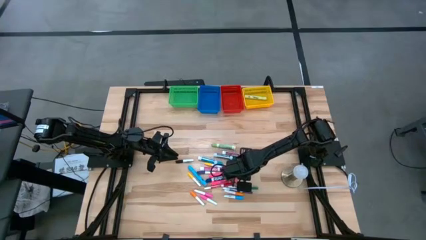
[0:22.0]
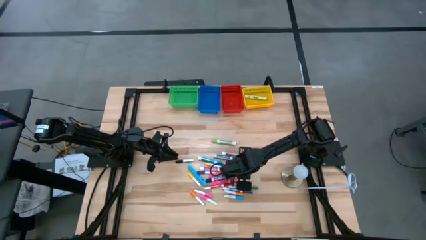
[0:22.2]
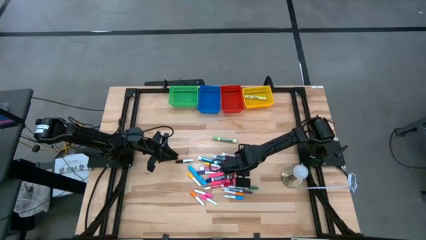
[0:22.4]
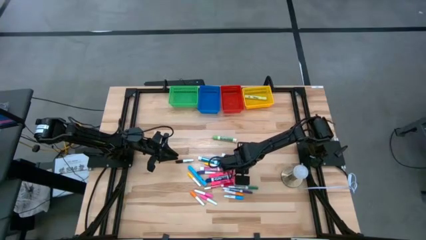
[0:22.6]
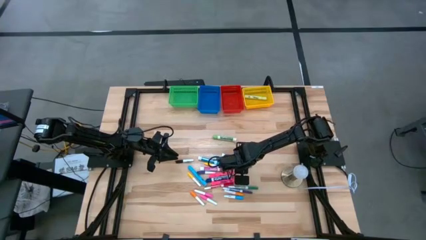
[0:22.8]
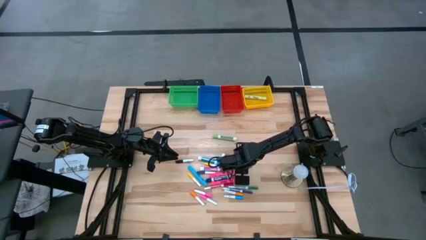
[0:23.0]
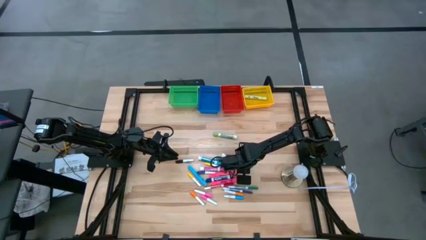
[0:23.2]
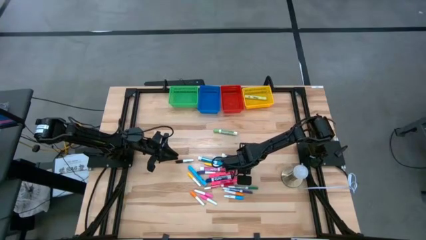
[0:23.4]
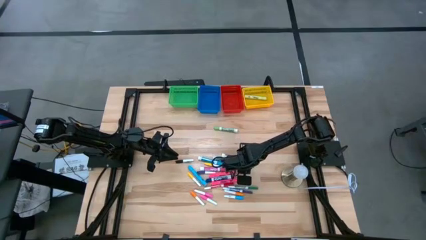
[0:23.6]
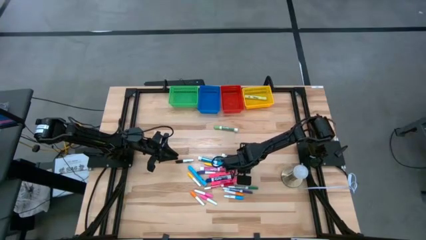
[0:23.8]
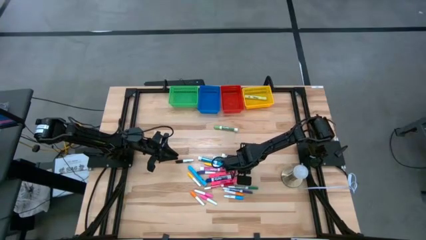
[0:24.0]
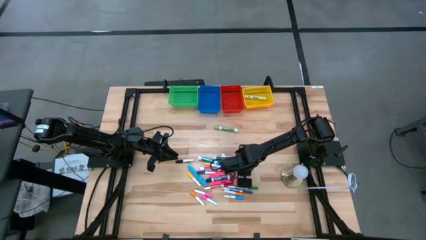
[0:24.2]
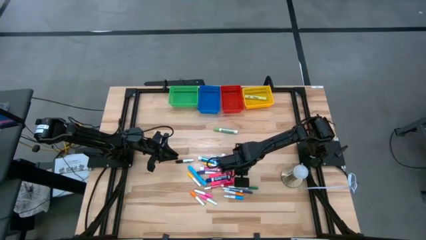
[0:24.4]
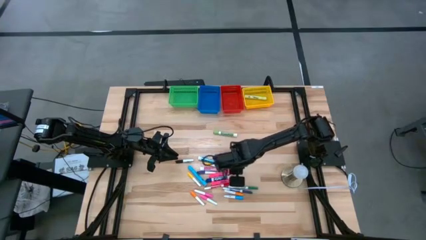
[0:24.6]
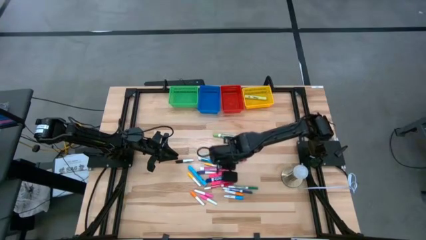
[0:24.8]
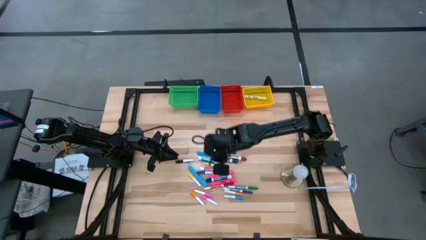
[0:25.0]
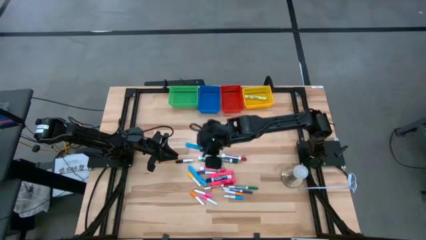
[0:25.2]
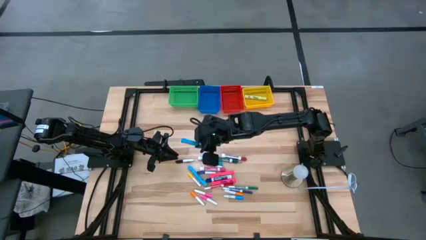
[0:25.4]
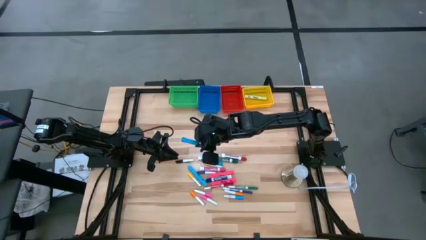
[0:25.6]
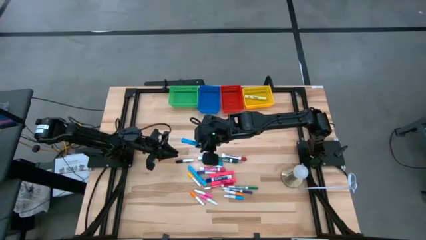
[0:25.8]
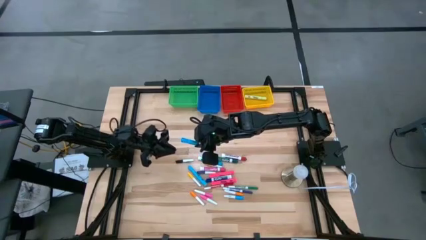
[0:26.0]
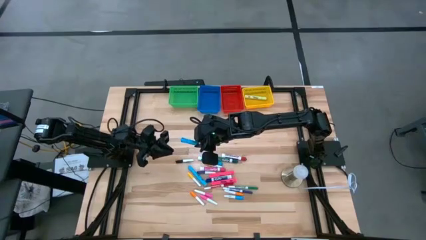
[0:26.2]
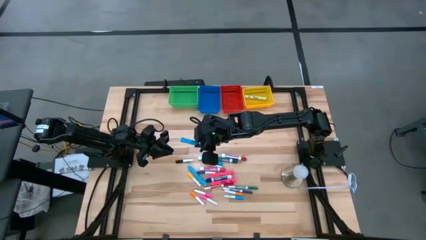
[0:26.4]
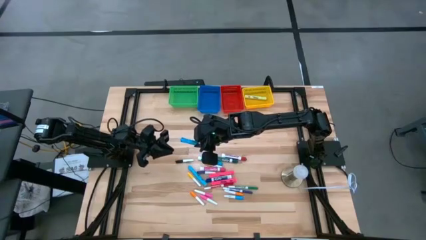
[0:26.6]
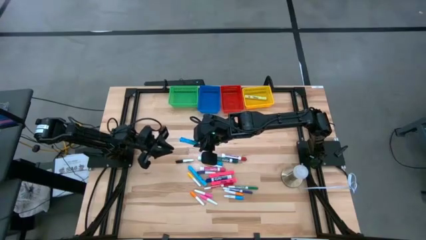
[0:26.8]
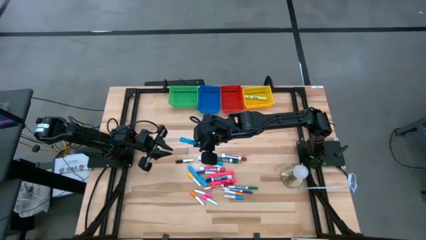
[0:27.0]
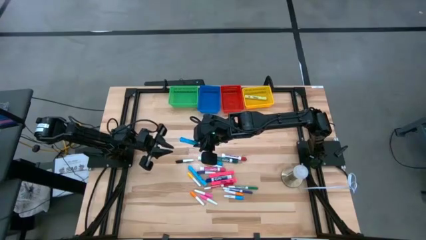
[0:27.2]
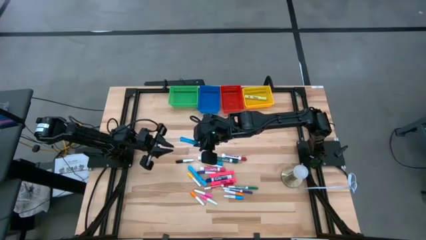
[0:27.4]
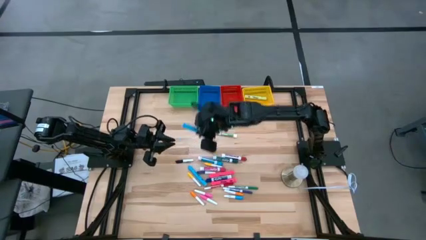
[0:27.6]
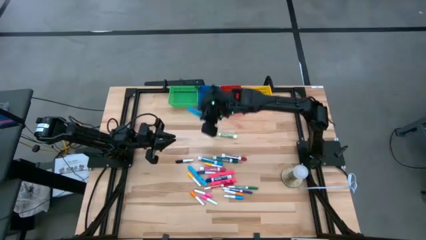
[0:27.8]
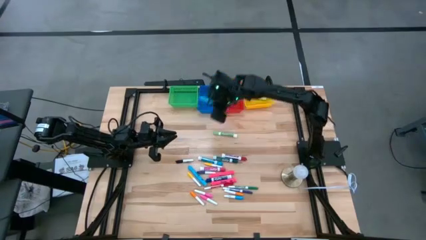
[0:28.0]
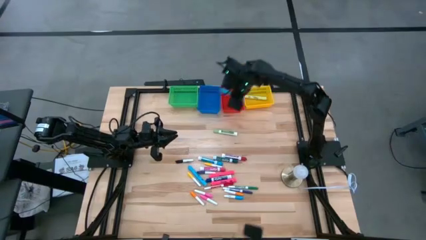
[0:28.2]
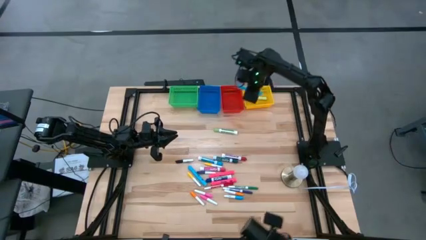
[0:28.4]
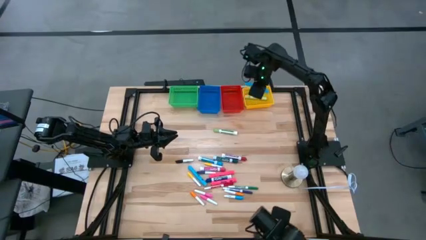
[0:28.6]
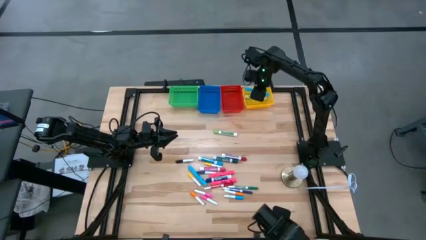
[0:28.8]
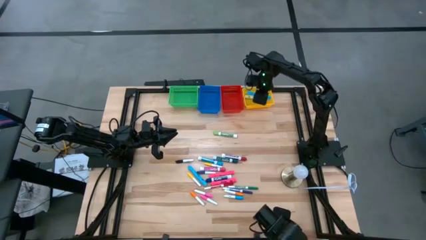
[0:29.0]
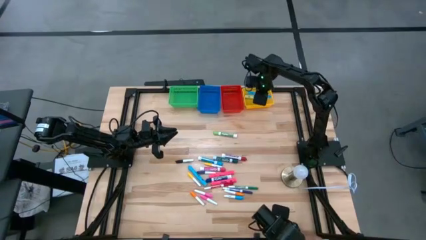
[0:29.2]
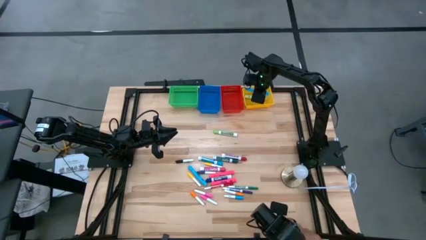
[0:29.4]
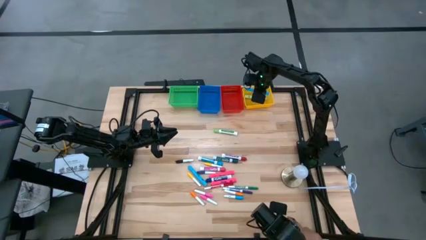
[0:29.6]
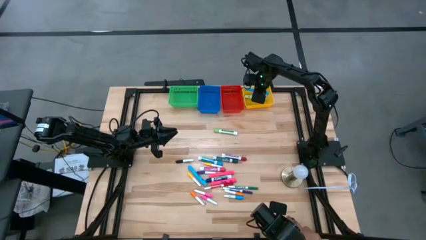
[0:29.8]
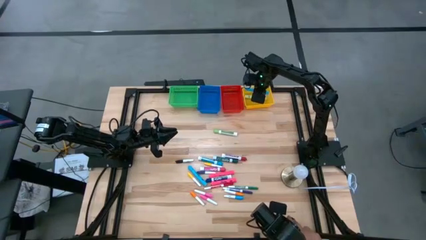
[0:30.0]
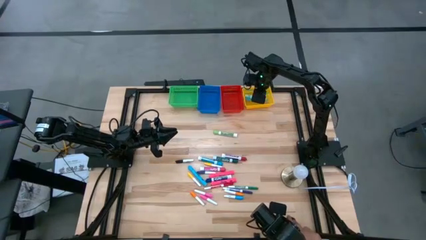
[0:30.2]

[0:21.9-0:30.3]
Task: Pick & Place Markers
Put the right large light blue highlighter pen into the yellow bin

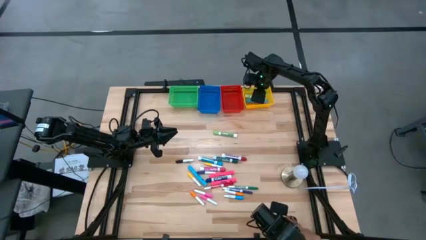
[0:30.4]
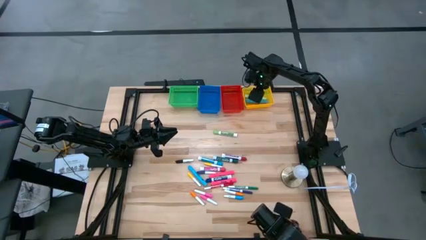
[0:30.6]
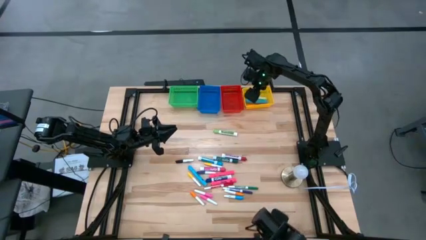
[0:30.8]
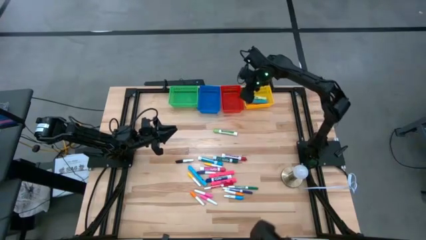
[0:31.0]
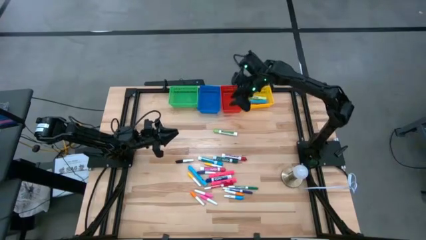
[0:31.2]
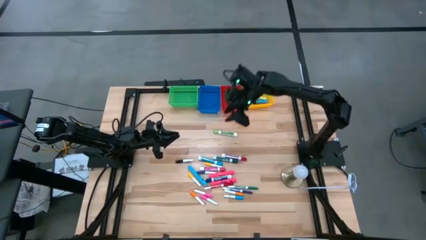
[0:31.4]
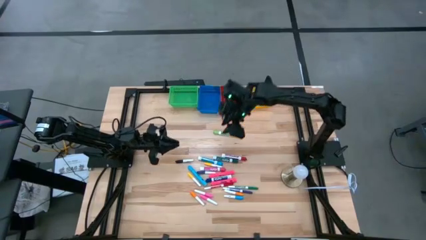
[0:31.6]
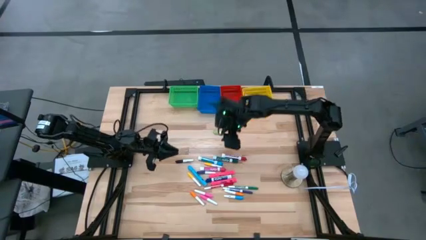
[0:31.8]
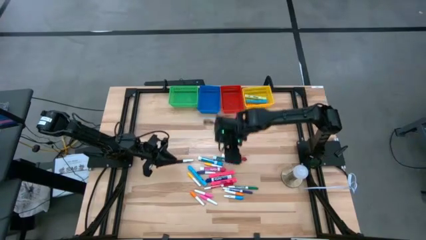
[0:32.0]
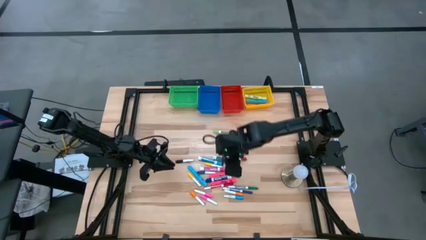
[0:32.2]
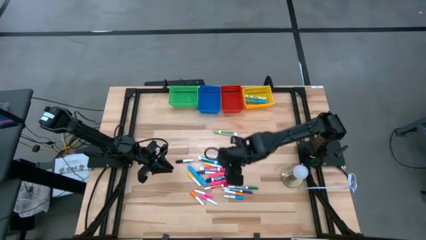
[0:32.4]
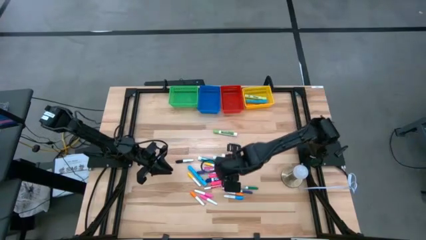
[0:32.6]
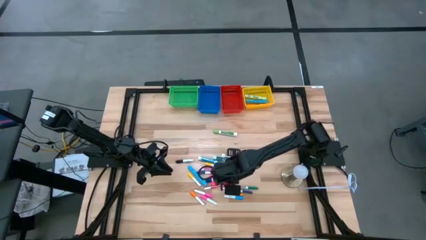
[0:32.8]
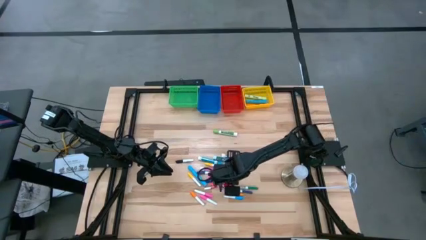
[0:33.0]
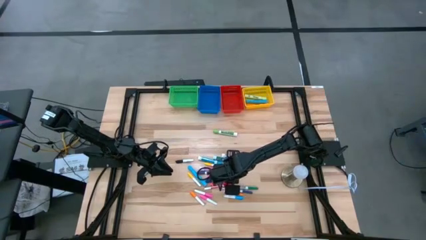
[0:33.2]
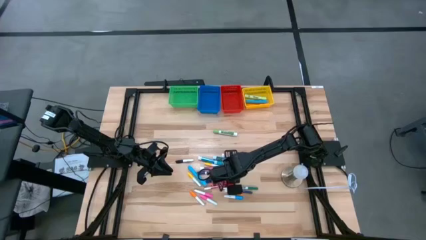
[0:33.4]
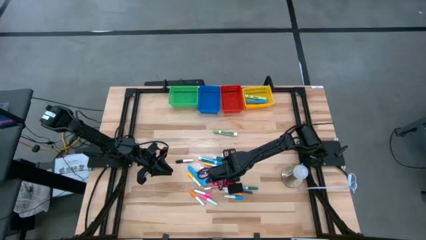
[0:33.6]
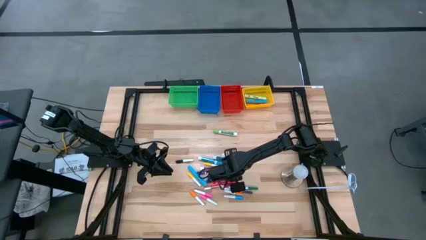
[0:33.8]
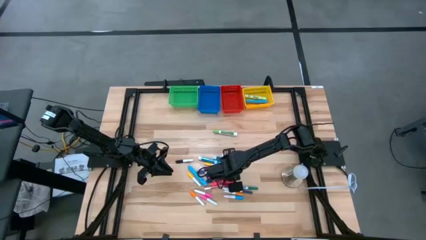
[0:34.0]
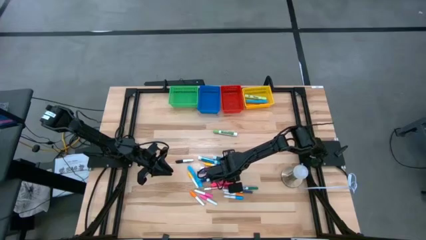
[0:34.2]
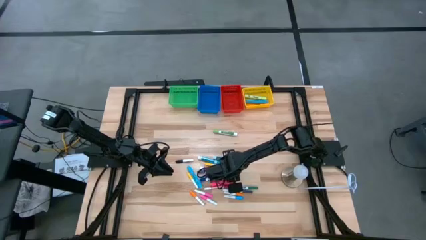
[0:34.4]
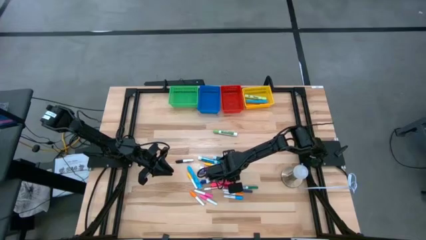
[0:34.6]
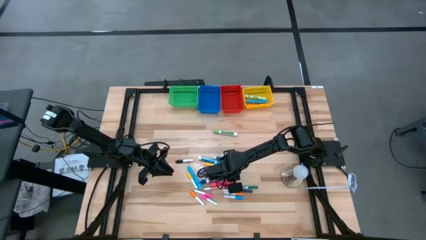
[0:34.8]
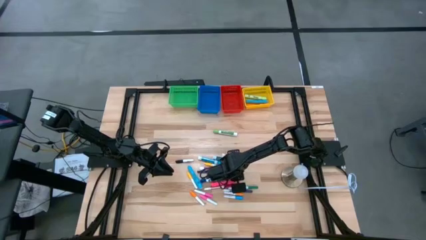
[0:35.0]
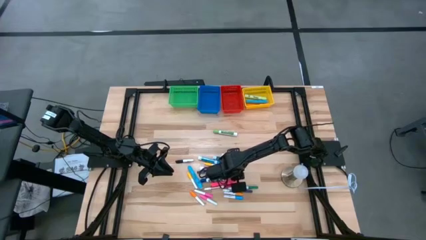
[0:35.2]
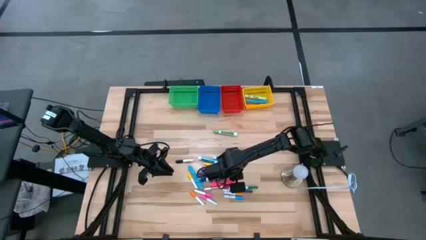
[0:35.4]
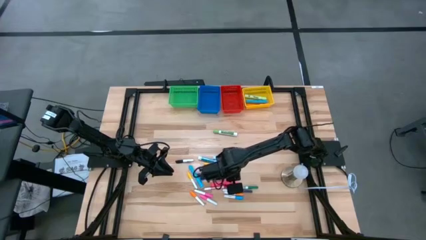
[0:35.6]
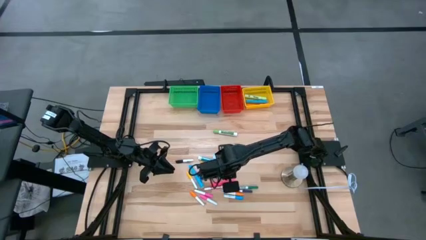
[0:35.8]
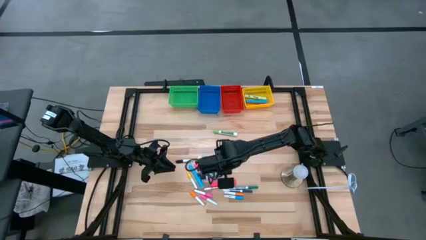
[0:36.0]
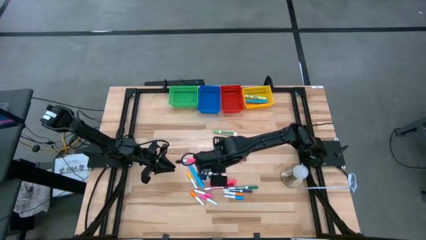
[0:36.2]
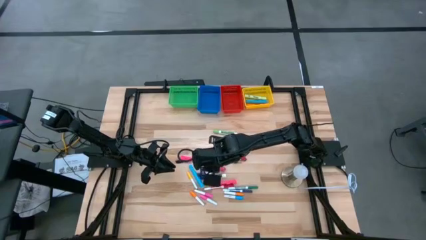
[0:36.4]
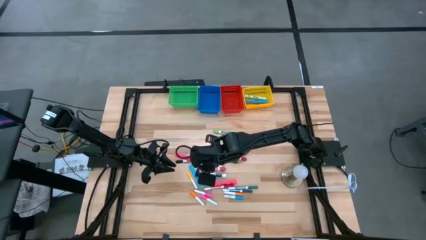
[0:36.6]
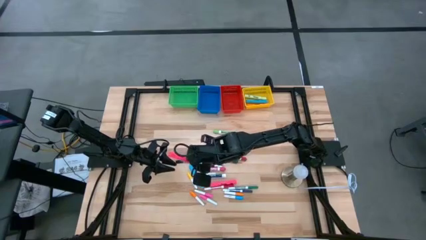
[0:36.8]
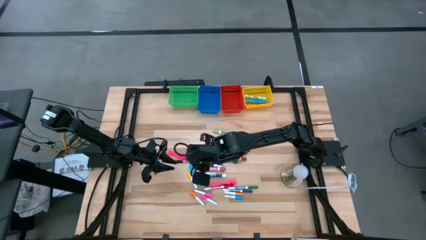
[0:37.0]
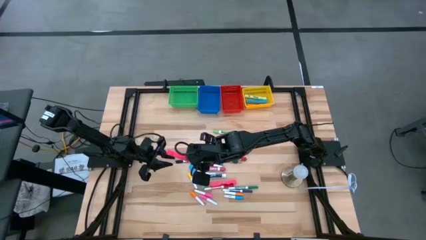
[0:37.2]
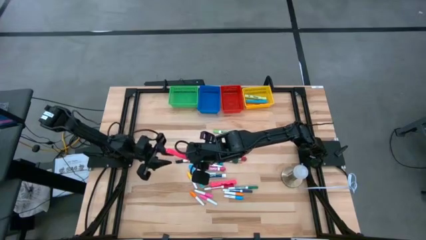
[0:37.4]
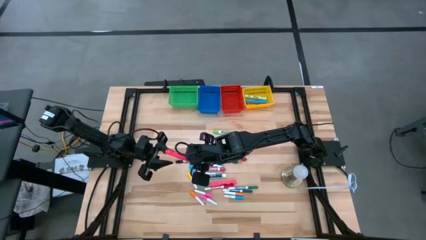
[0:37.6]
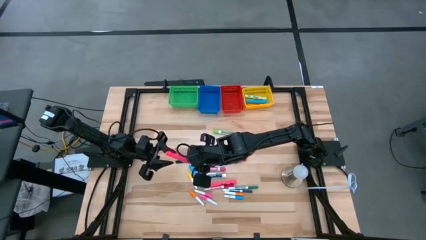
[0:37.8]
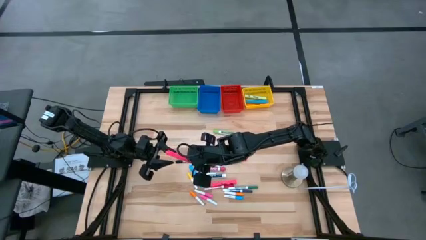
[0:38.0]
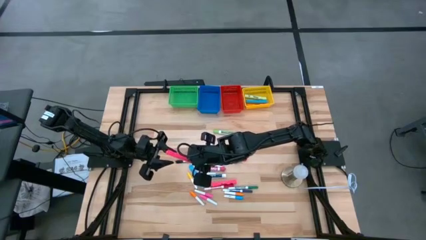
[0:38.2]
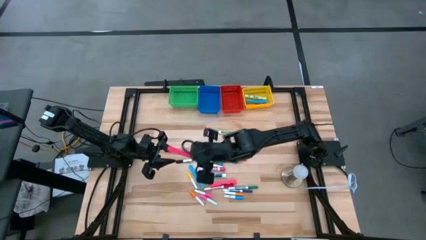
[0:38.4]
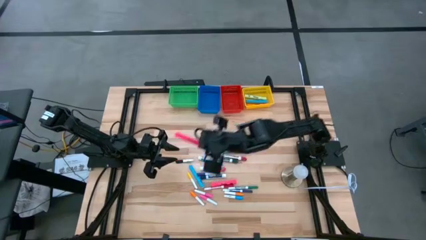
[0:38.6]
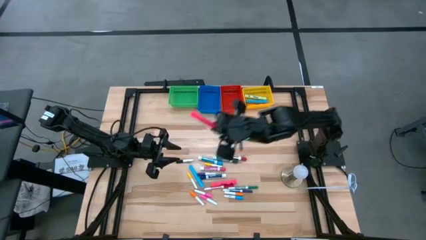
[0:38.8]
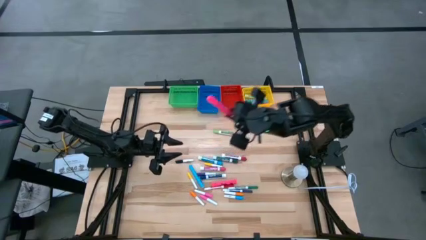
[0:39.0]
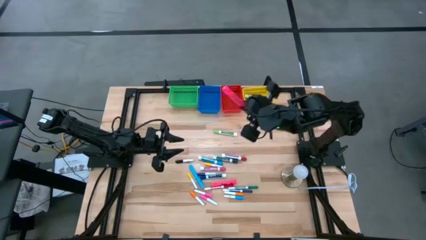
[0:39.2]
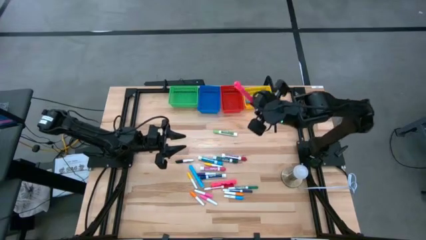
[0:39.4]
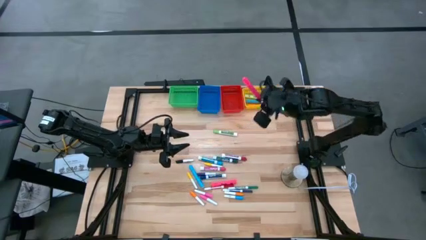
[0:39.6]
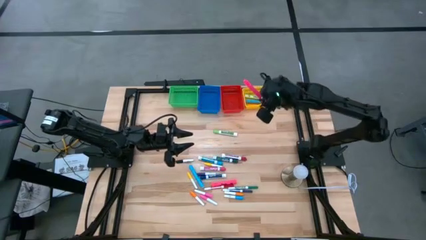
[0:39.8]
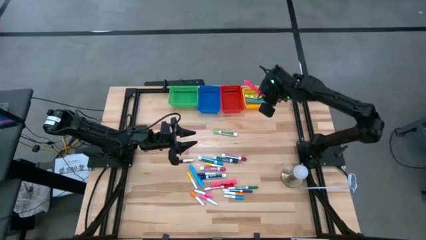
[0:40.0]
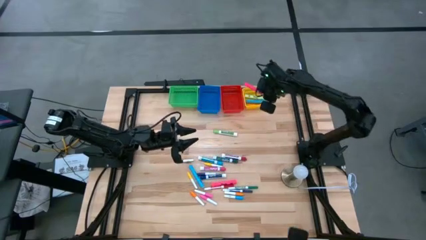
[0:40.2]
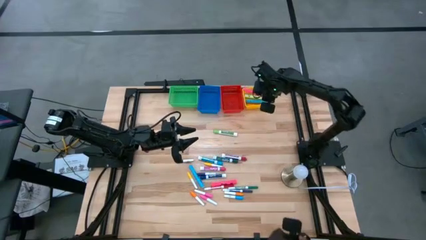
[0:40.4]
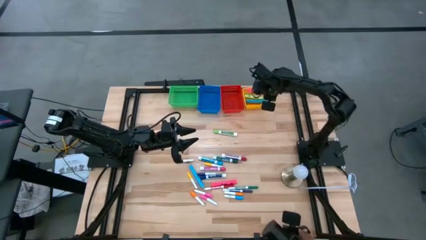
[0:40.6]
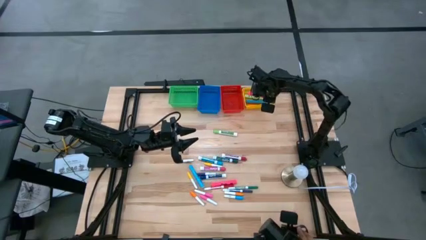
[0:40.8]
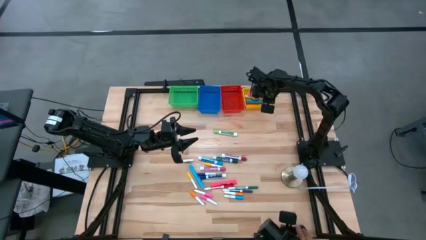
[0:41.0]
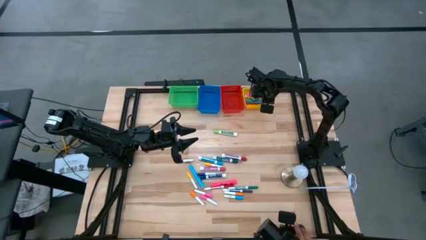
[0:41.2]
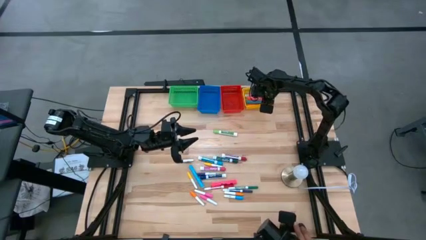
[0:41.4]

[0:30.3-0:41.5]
Put the top large pink highlighter pen into the yellow bin
